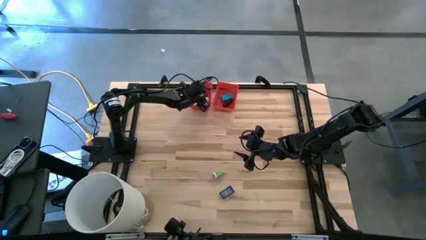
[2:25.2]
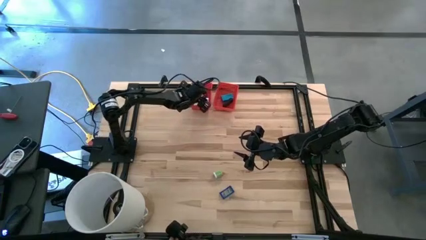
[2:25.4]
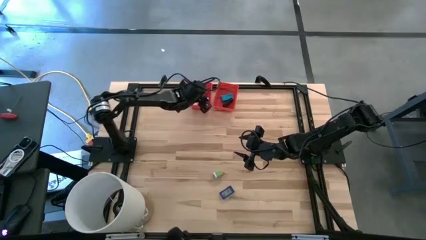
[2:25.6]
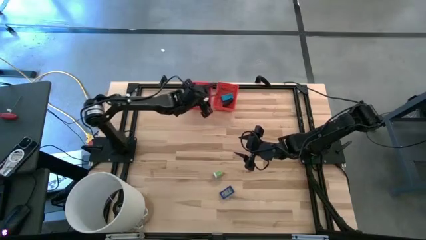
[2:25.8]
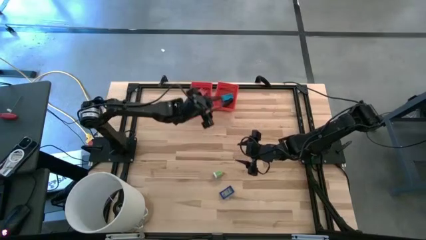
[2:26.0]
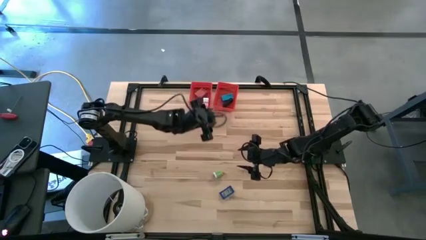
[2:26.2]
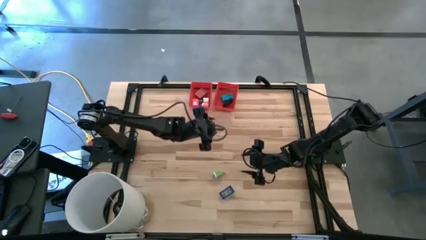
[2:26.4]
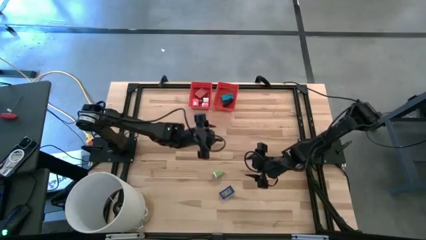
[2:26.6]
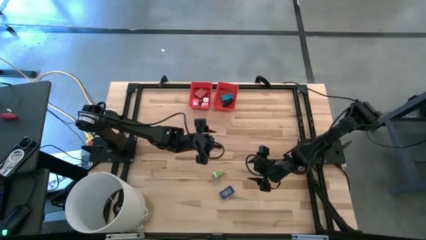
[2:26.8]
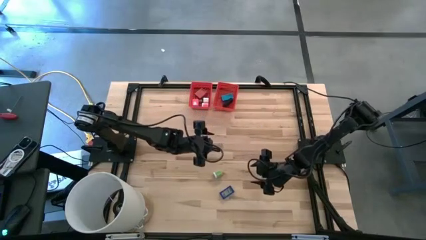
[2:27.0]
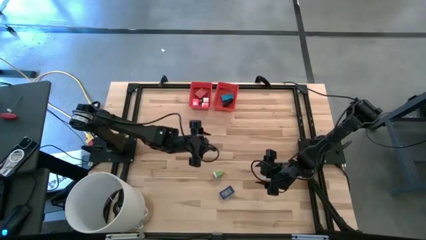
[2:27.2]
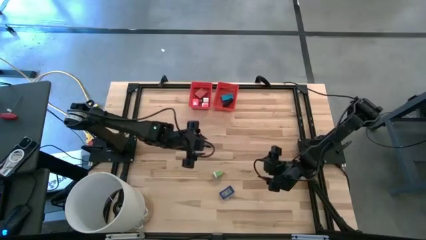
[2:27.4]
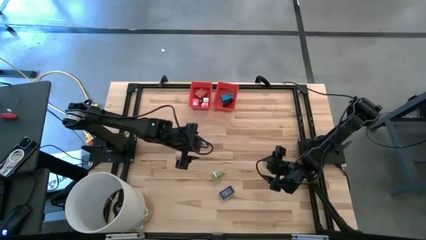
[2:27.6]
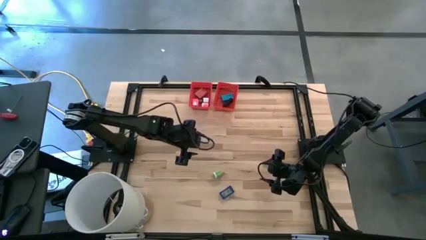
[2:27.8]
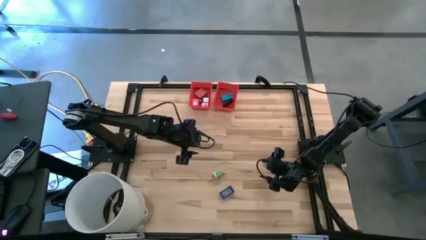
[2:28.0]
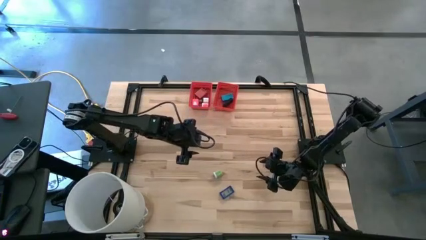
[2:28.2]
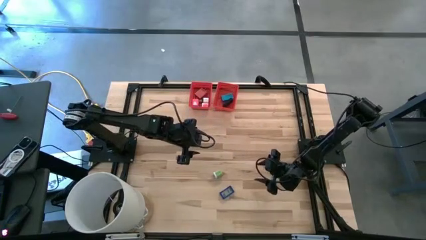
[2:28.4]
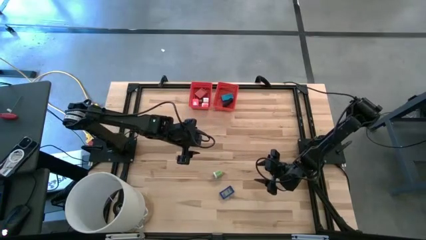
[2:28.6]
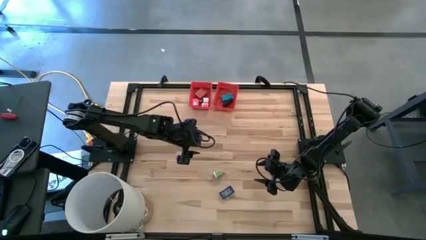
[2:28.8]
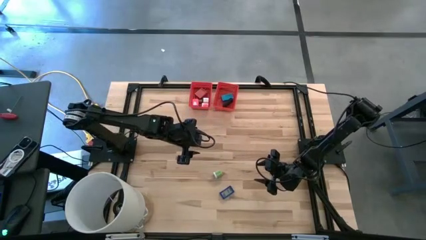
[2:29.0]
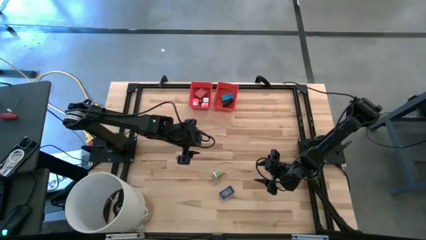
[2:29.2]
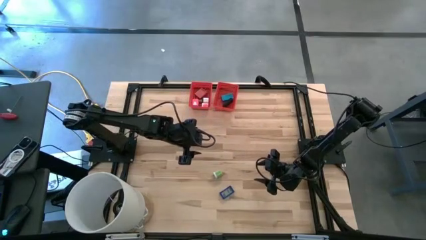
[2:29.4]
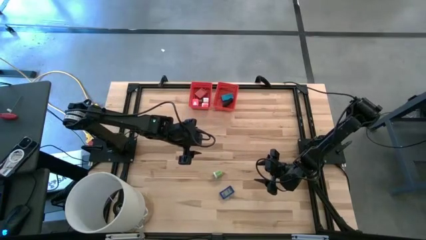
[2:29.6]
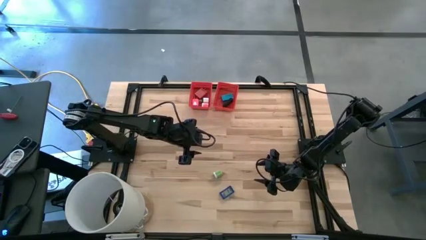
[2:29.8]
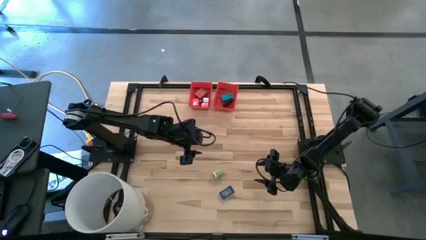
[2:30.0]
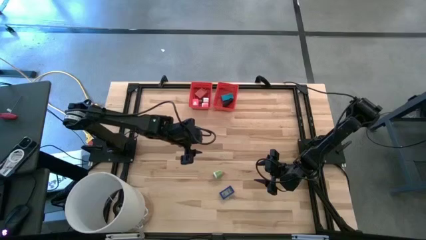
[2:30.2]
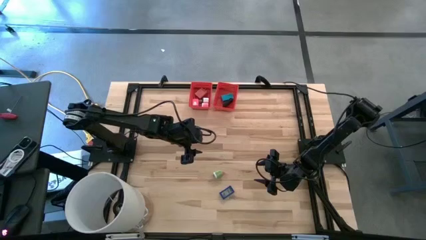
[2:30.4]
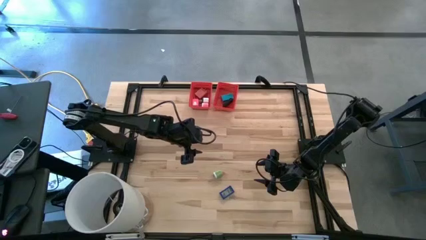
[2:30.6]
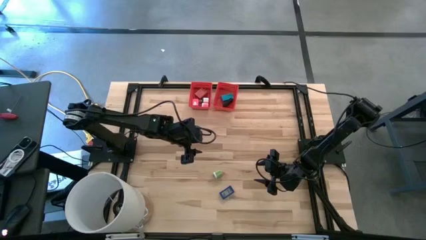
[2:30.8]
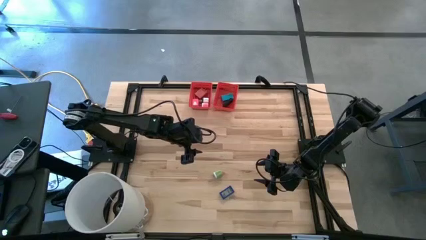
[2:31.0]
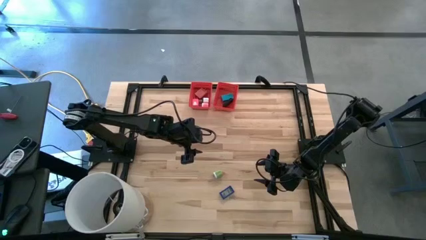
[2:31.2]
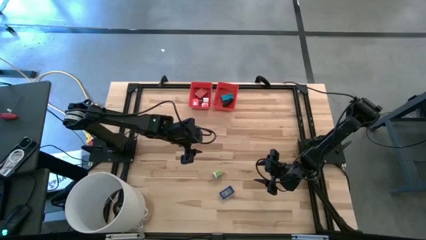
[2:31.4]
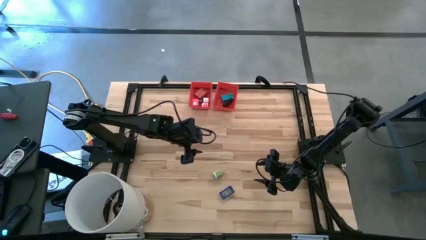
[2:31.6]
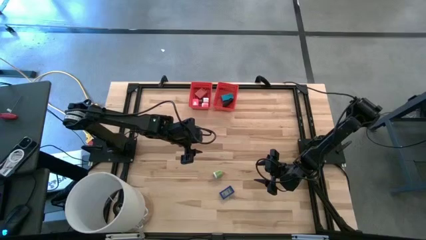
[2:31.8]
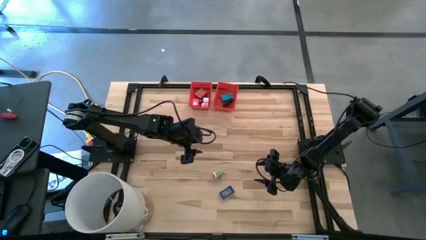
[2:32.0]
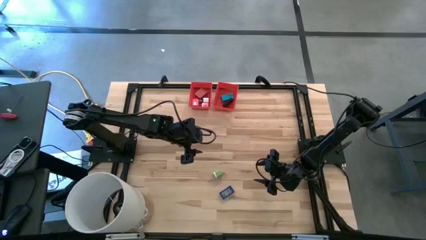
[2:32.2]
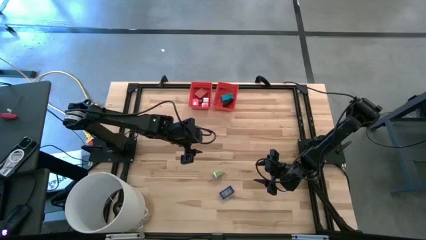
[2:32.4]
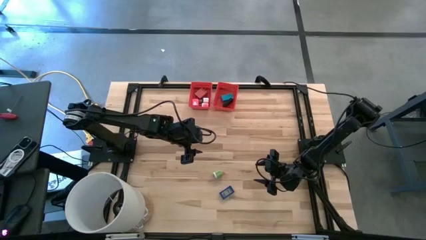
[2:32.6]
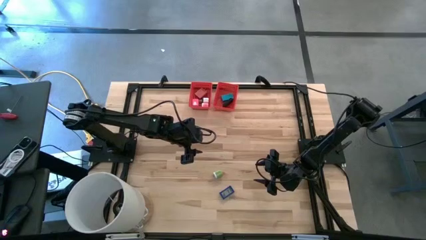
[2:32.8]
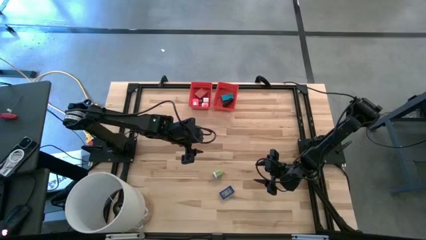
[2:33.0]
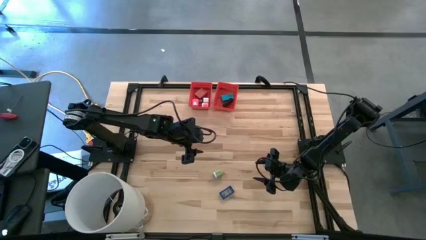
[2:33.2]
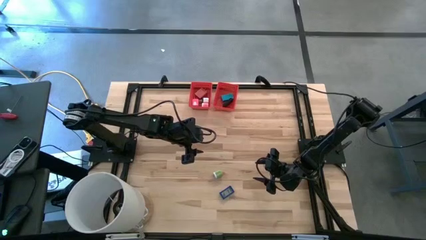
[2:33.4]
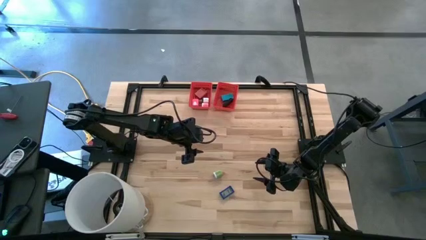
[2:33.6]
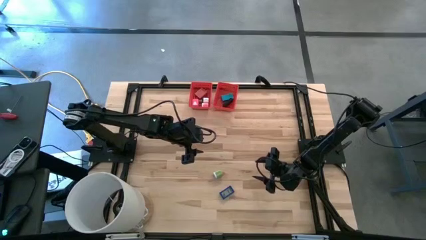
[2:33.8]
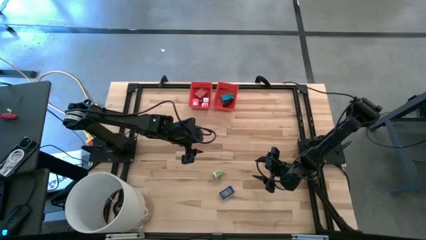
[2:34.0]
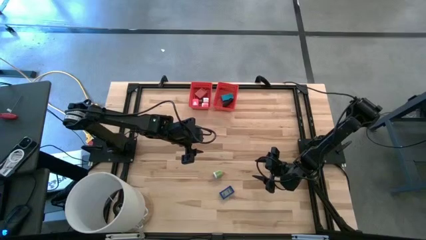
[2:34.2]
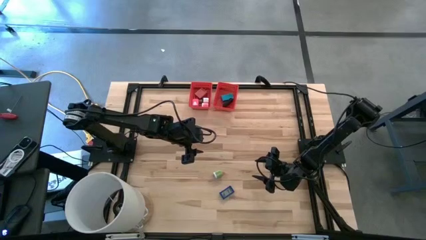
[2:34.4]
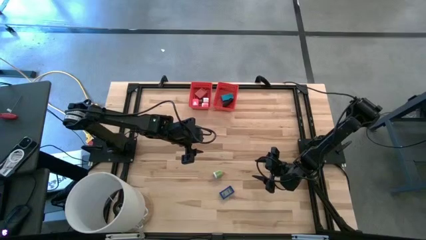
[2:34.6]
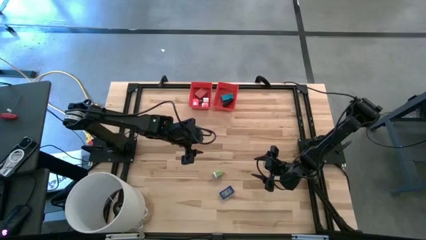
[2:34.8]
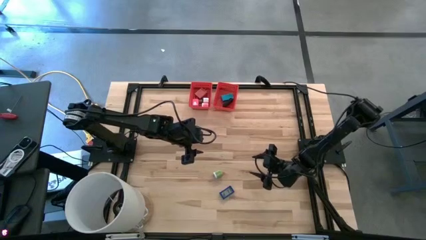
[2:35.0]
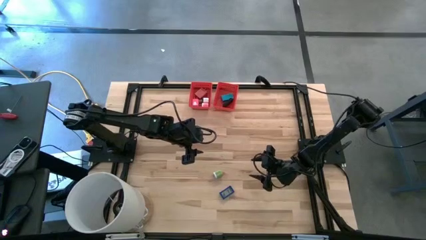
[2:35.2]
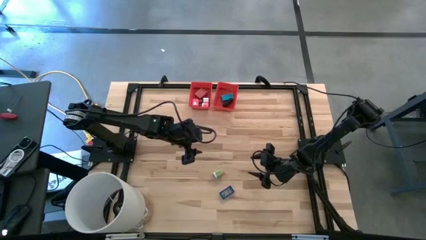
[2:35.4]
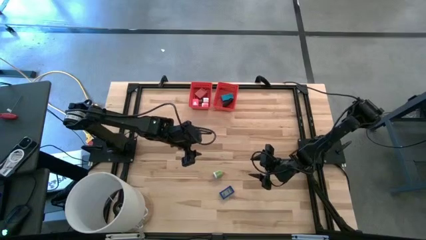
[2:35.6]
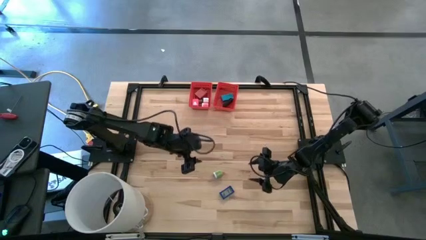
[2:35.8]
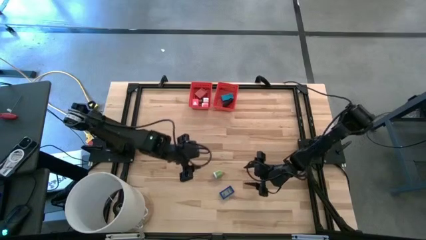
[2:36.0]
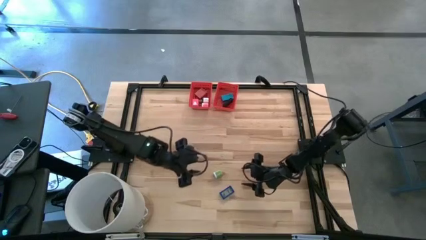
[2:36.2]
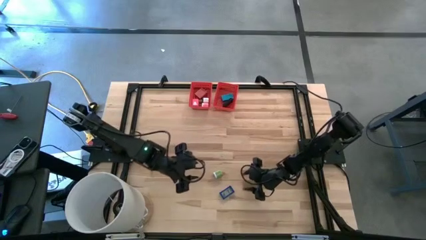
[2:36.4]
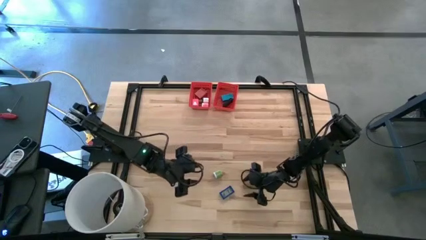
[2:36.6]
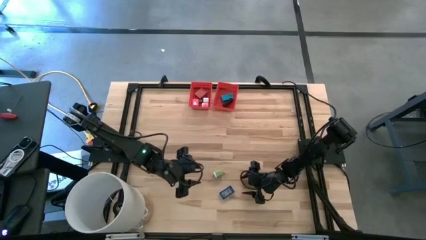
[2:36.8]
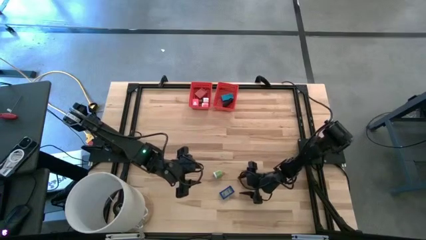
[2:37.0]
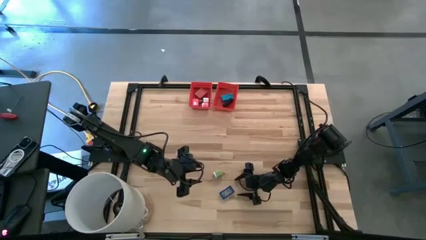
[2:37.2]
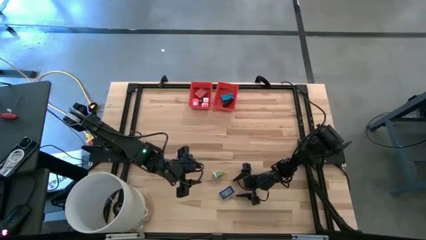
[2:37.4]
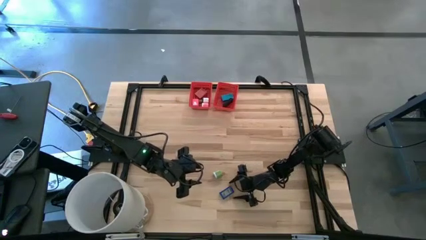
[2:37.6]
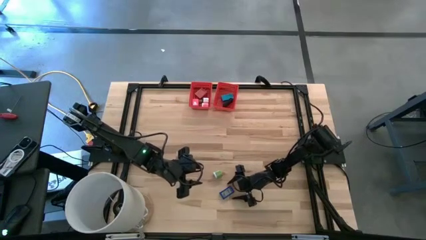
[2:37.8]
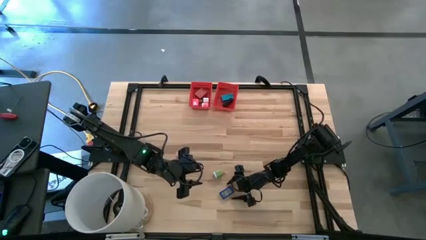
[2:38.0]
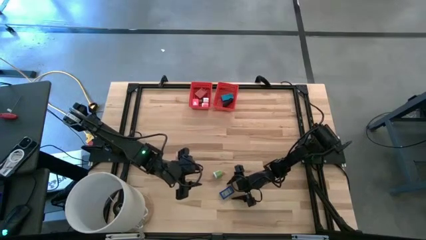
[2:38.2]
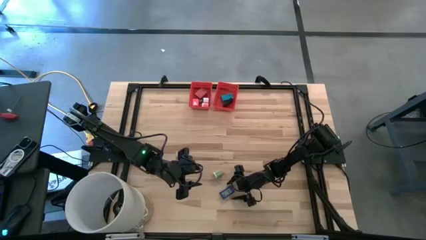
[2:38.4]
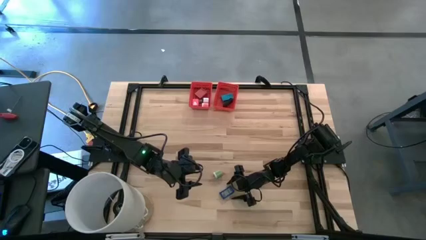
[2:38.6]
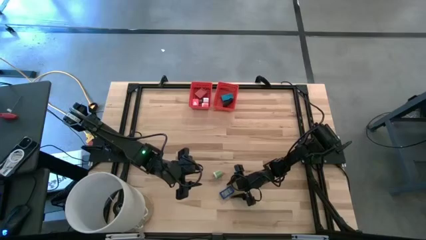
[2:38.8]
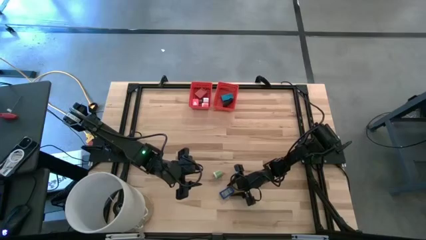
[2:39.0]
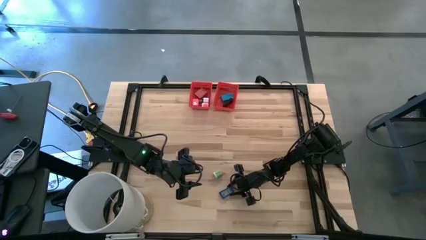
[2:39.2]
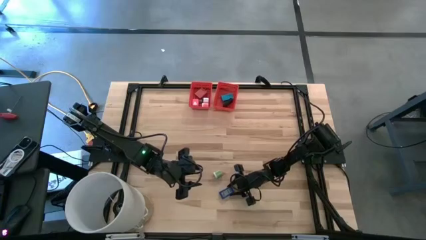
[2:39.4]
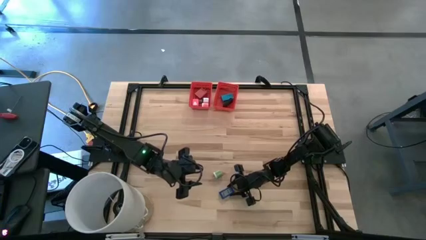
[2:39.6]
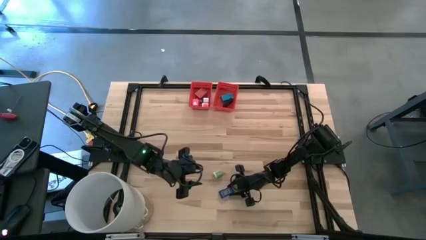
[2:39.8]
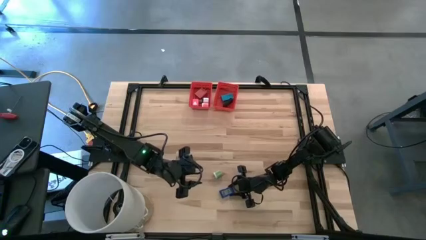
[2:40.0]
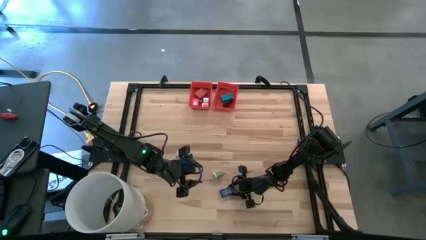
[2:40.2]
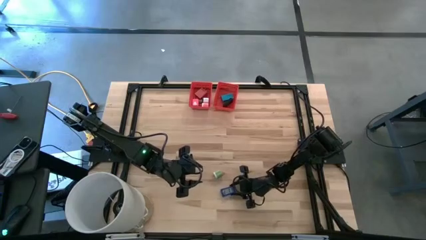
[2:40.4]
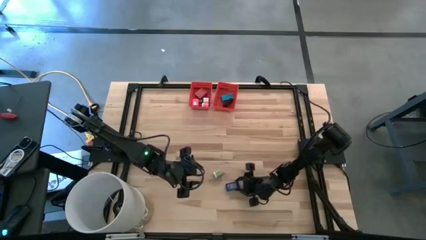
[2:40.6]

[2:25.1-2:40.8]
Task: Pick & Place Office items
Put the blue digital clock into the right red basket

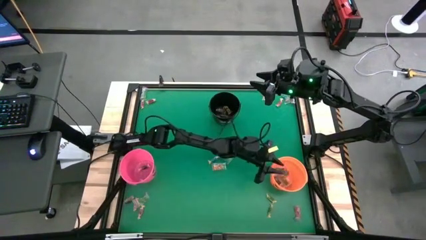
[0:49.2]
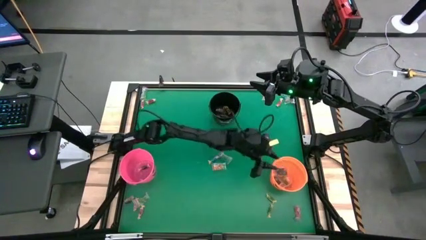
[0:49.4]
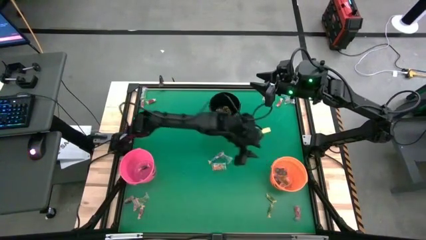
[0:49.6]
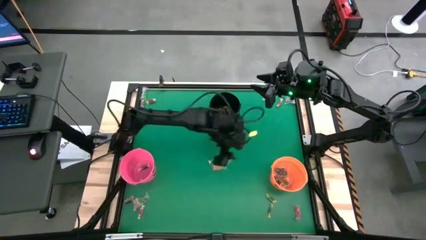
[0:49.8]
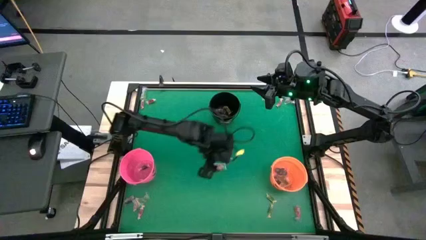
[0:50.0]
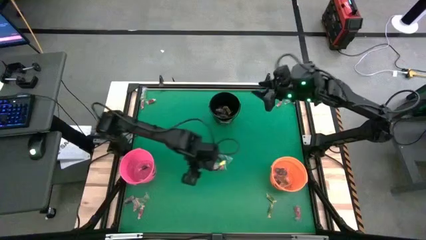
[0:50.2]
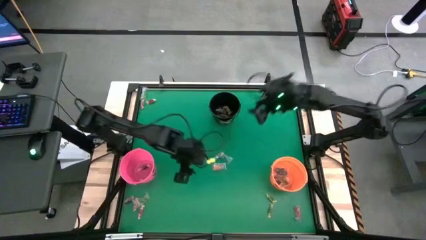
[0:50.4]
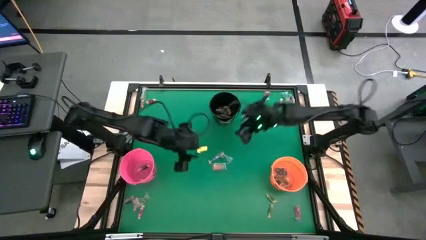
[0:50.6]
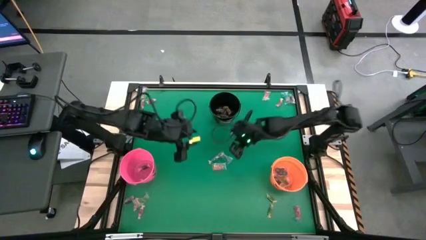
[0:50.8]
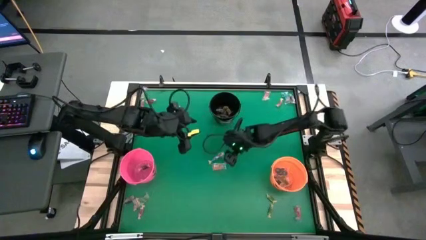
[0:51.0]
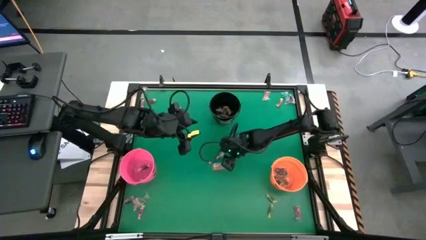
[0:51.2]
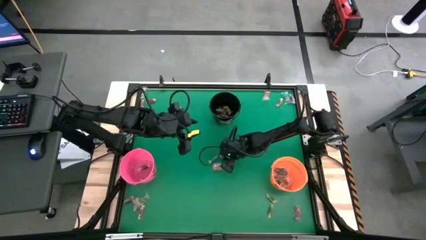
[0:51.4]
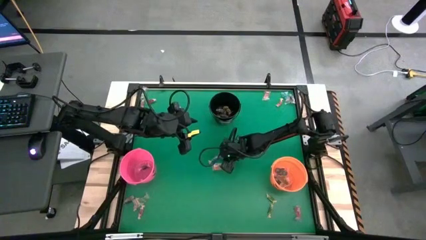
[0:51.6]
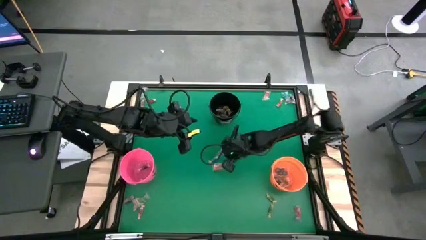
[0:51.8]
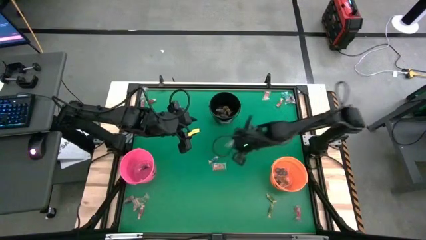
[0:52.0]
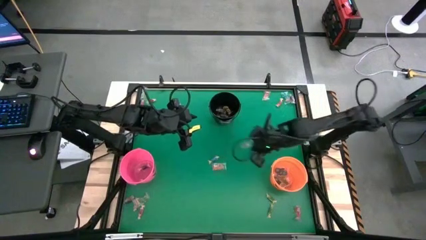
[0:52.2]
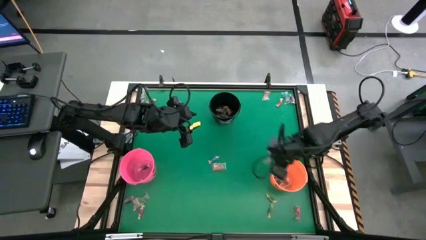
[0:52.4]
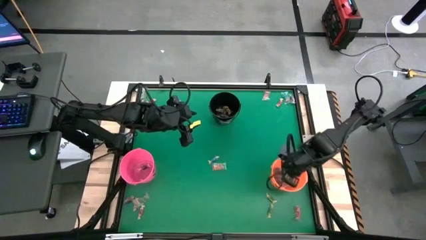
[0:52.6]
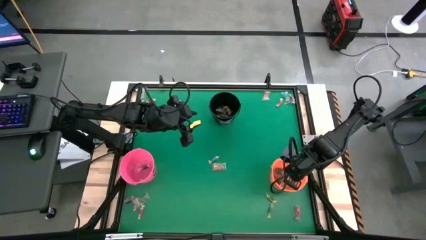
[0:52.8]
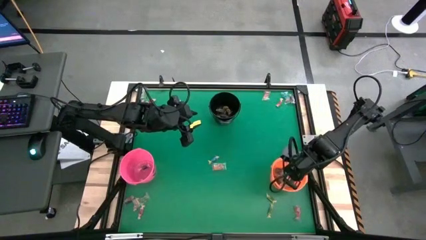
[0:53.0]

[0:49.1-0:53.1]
Task: Sort candy by brand, put in halloween buckets
Put the blue gummy into the orange bucket
